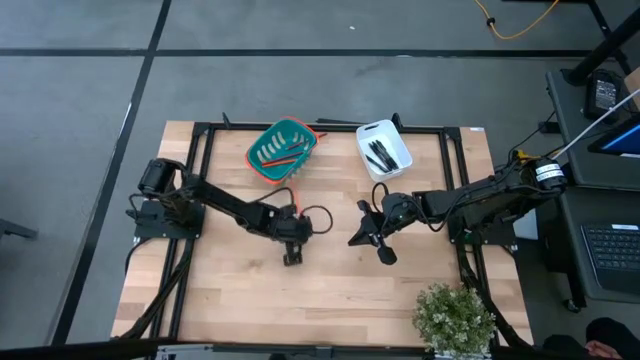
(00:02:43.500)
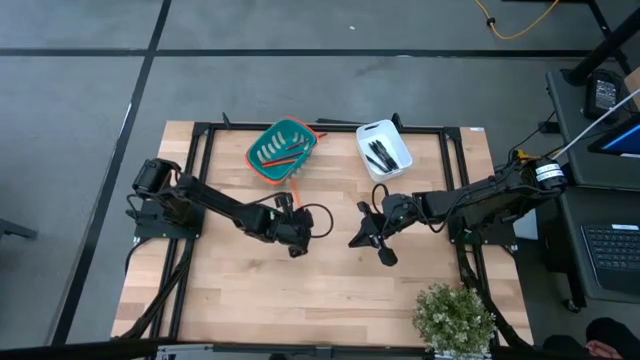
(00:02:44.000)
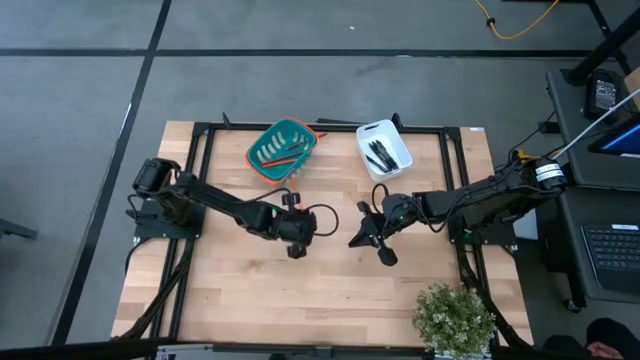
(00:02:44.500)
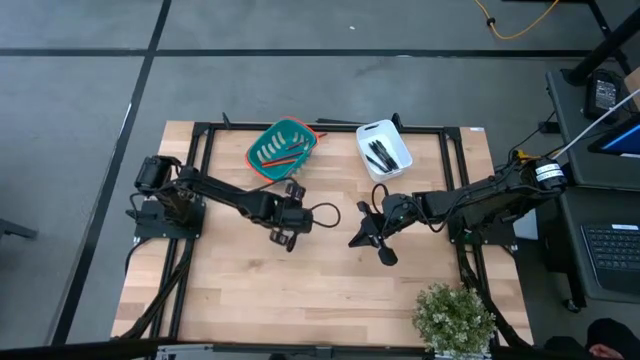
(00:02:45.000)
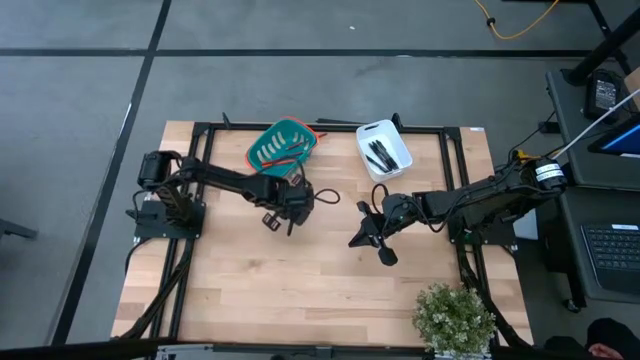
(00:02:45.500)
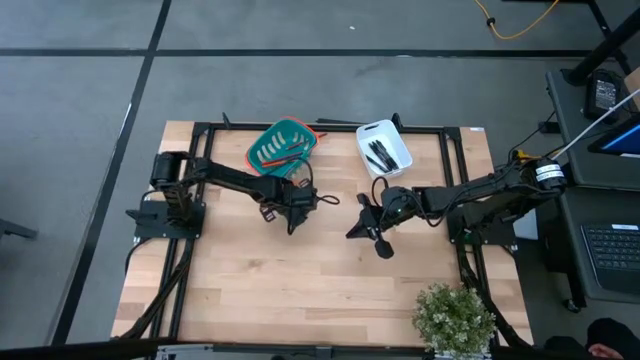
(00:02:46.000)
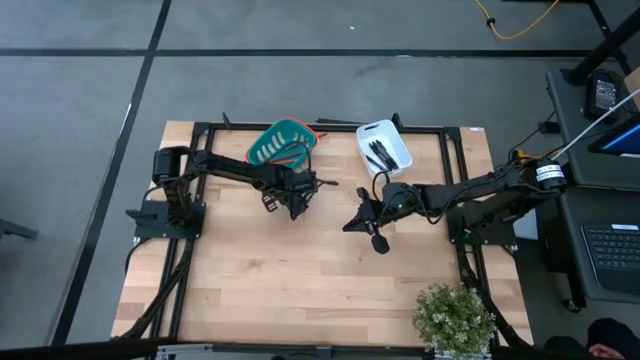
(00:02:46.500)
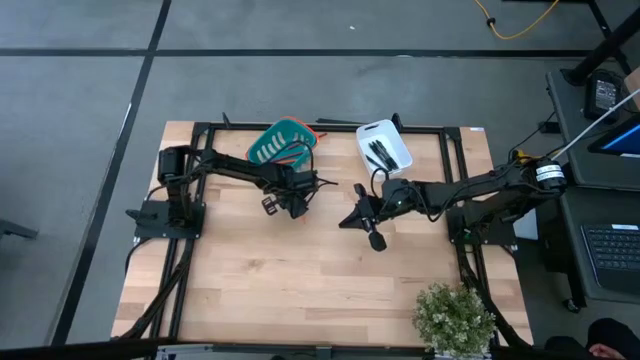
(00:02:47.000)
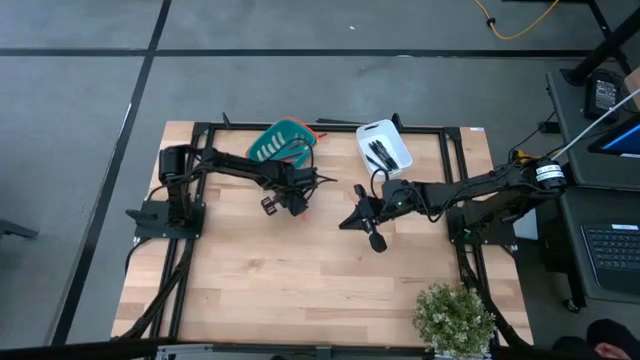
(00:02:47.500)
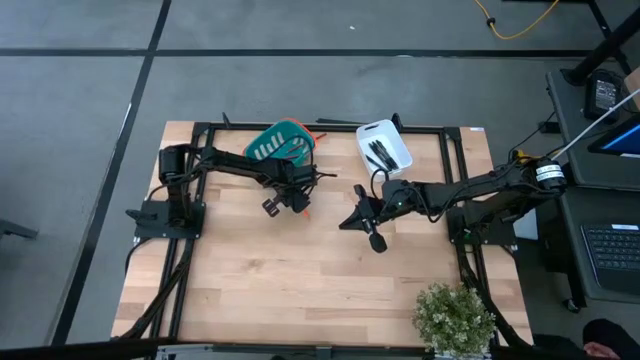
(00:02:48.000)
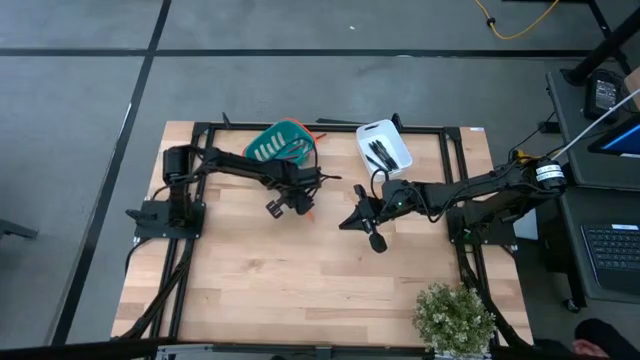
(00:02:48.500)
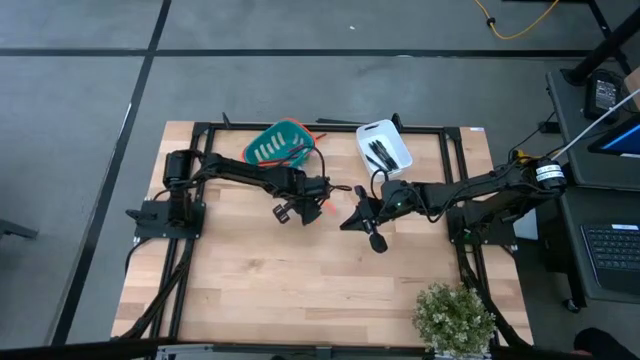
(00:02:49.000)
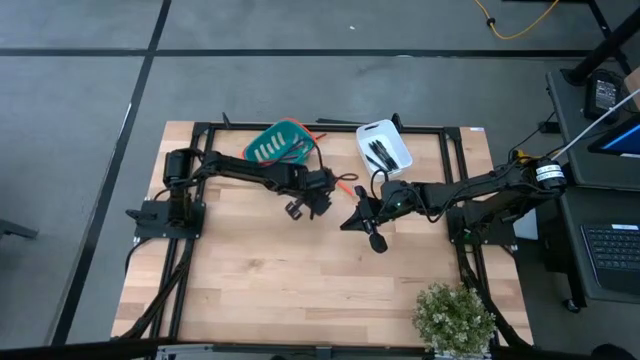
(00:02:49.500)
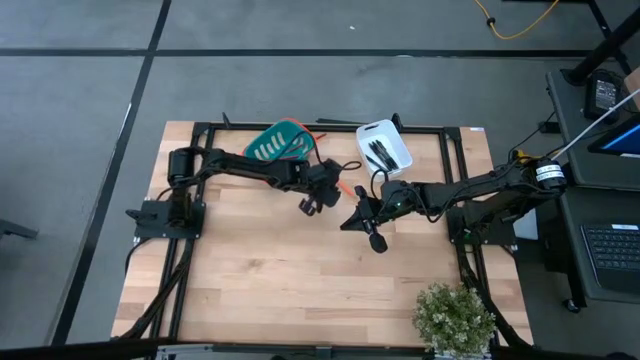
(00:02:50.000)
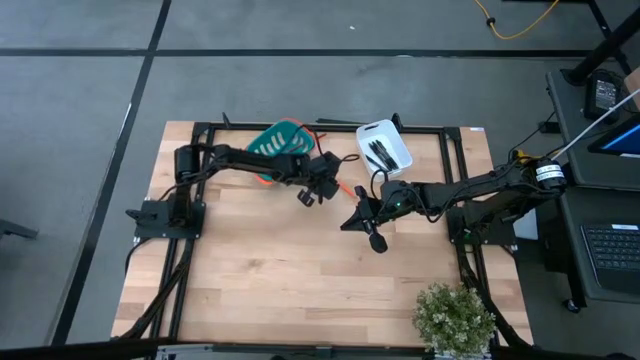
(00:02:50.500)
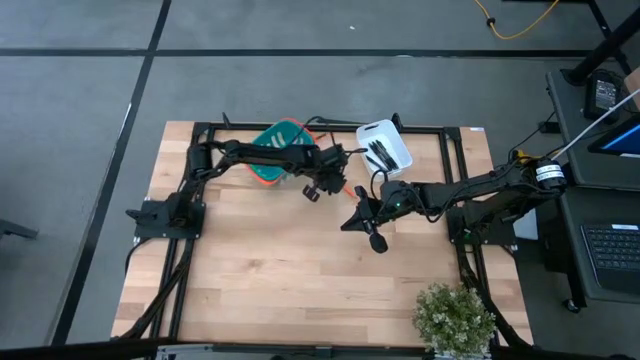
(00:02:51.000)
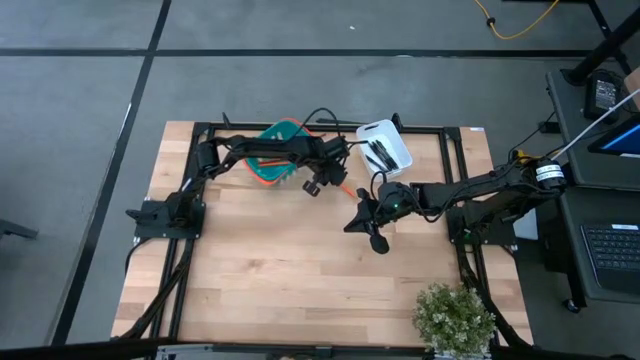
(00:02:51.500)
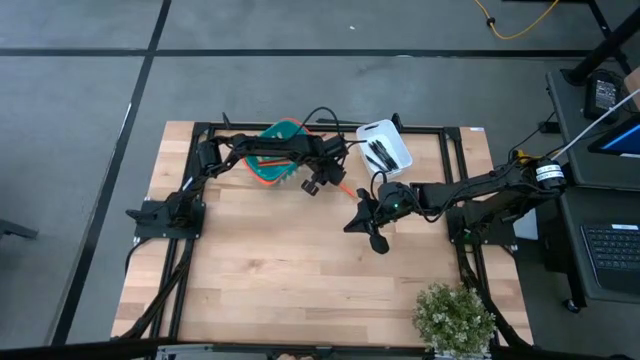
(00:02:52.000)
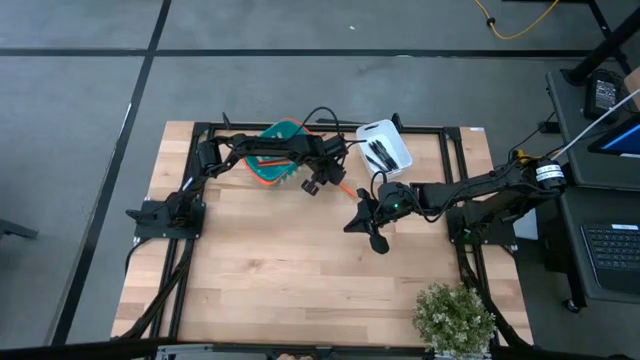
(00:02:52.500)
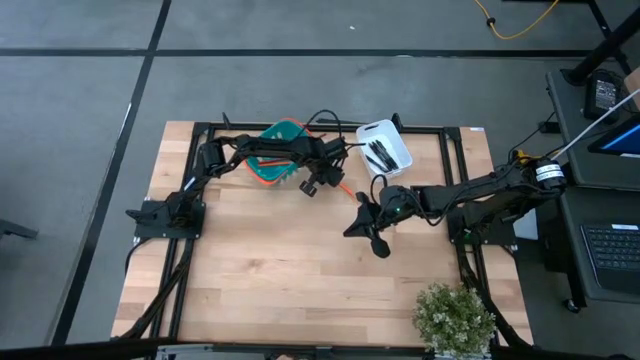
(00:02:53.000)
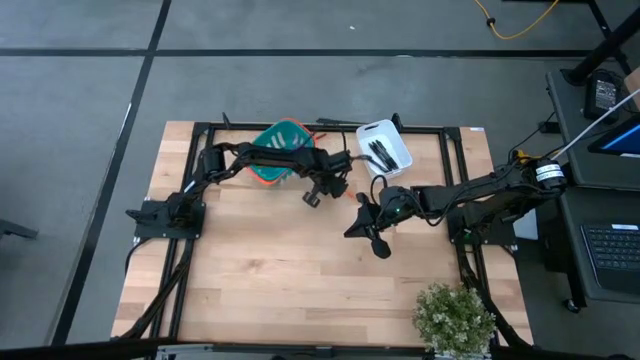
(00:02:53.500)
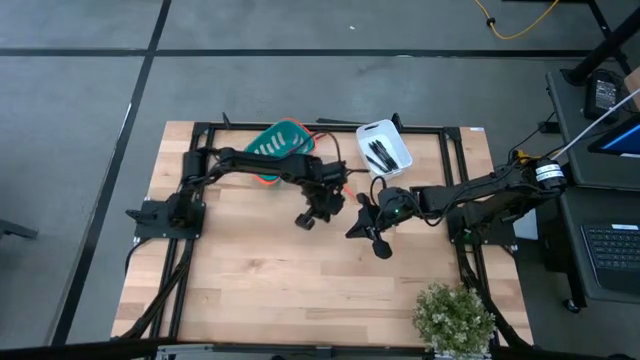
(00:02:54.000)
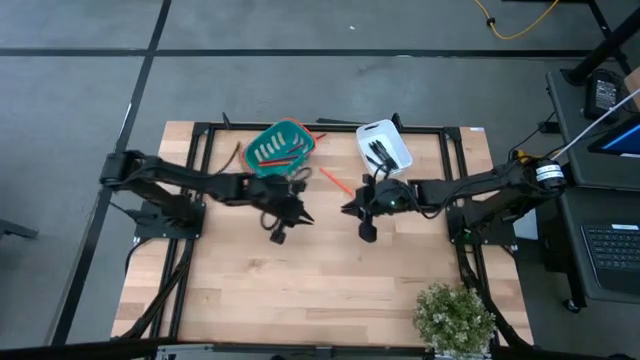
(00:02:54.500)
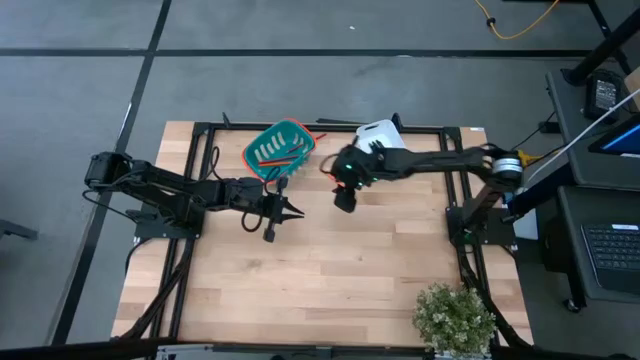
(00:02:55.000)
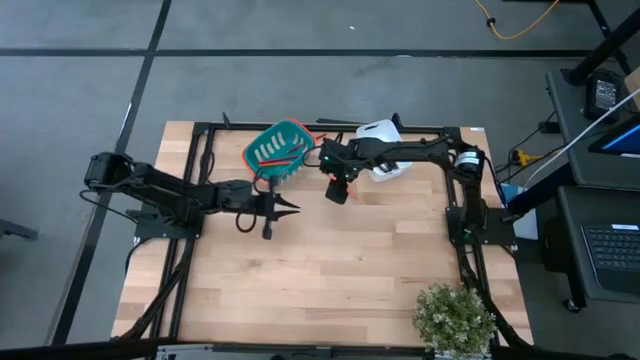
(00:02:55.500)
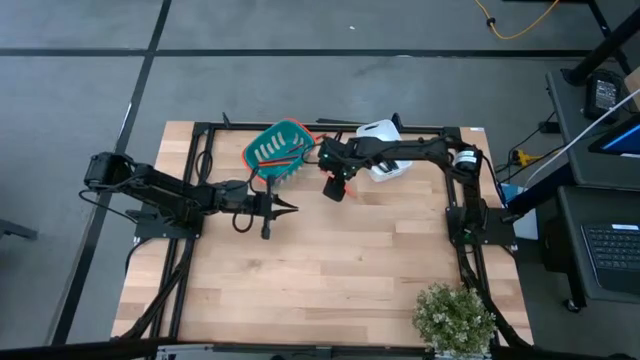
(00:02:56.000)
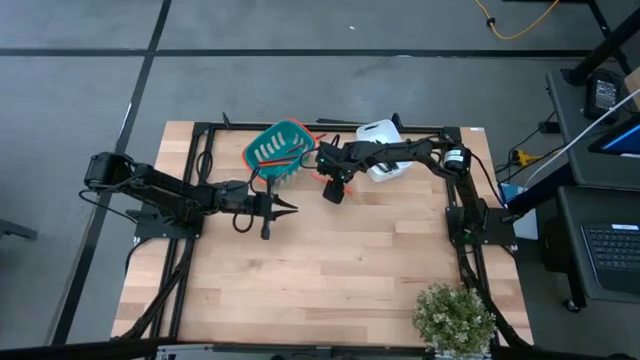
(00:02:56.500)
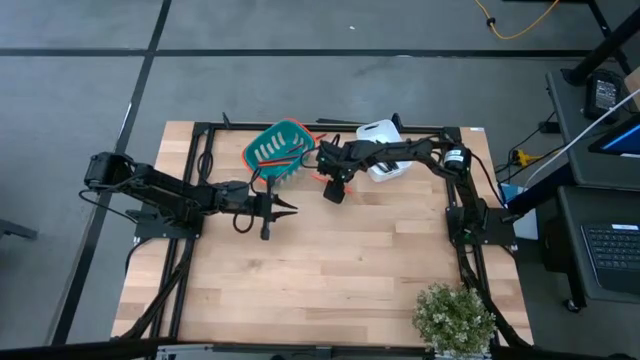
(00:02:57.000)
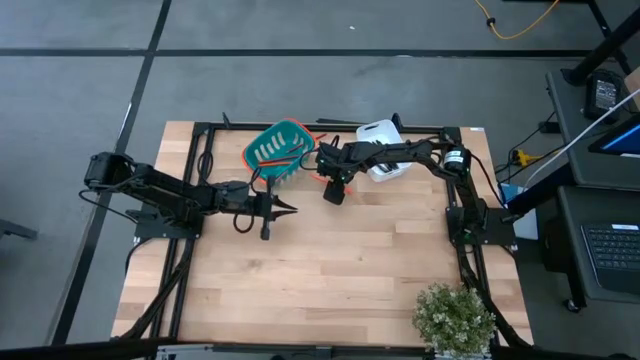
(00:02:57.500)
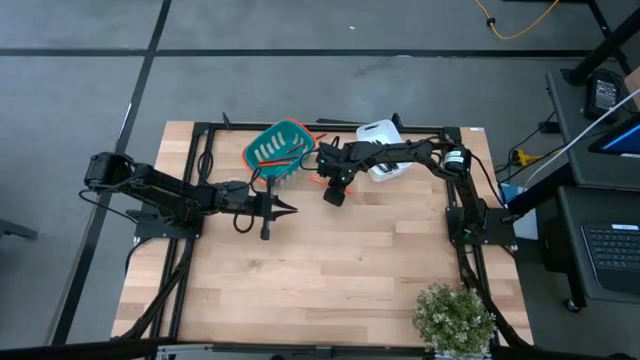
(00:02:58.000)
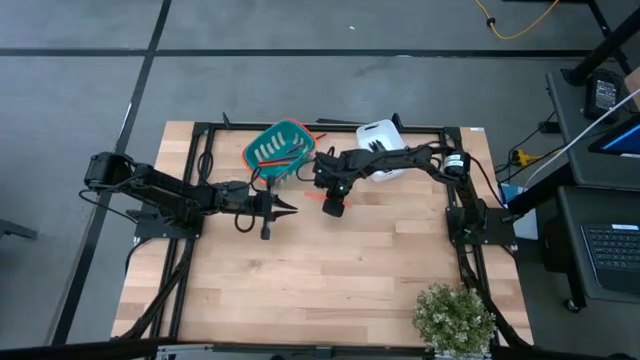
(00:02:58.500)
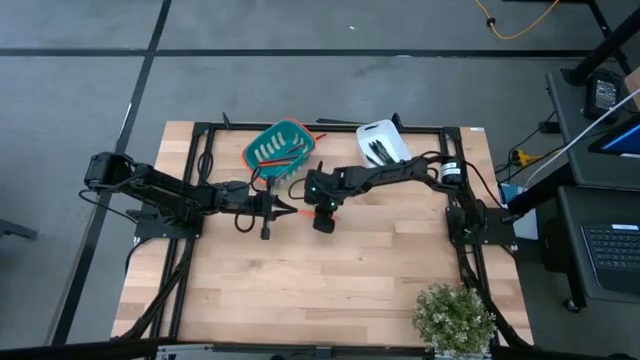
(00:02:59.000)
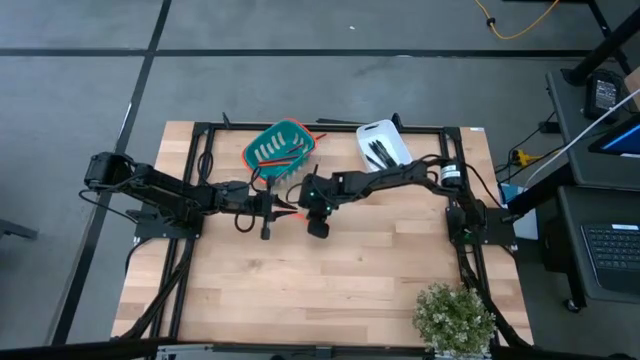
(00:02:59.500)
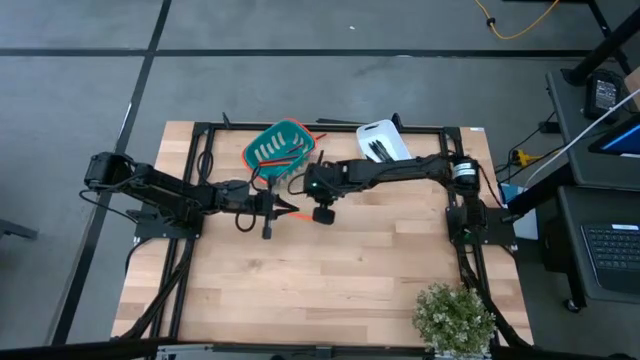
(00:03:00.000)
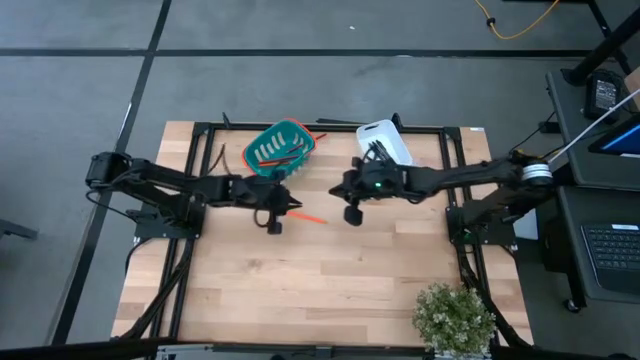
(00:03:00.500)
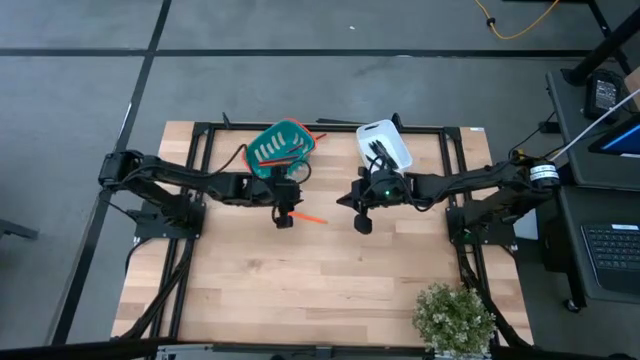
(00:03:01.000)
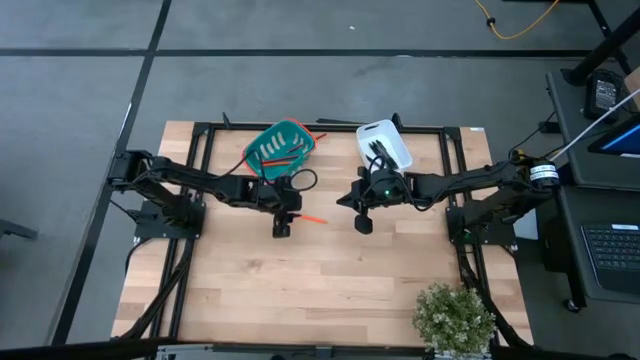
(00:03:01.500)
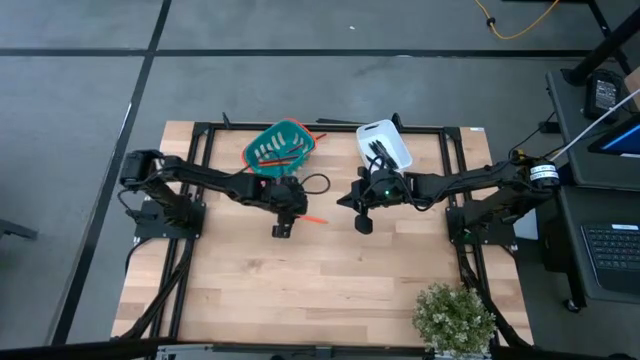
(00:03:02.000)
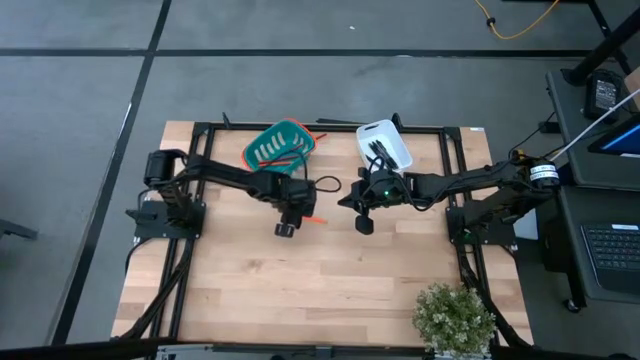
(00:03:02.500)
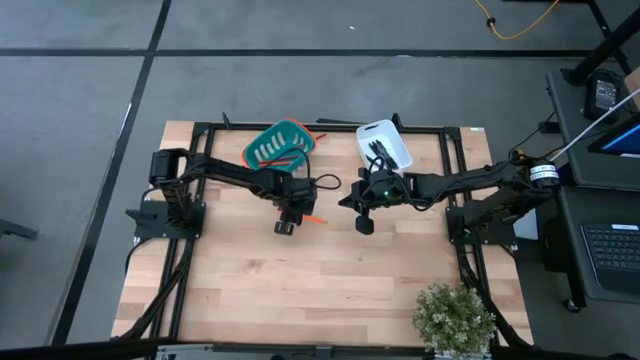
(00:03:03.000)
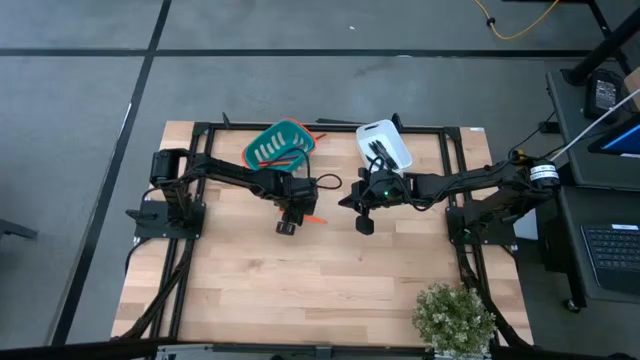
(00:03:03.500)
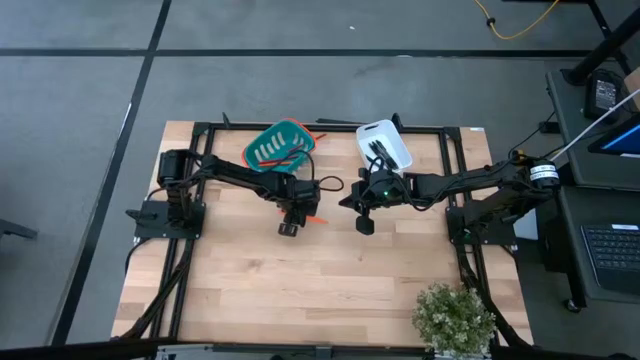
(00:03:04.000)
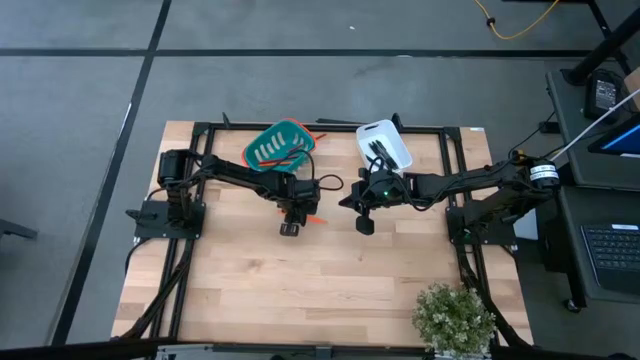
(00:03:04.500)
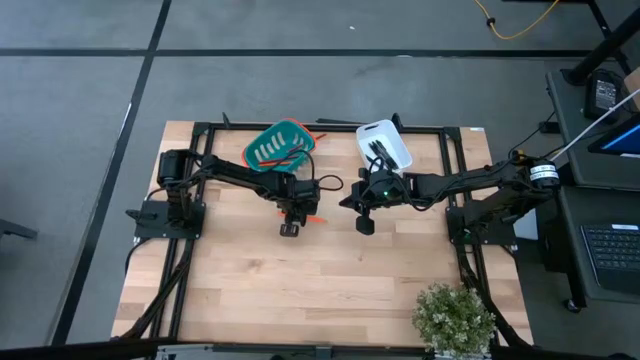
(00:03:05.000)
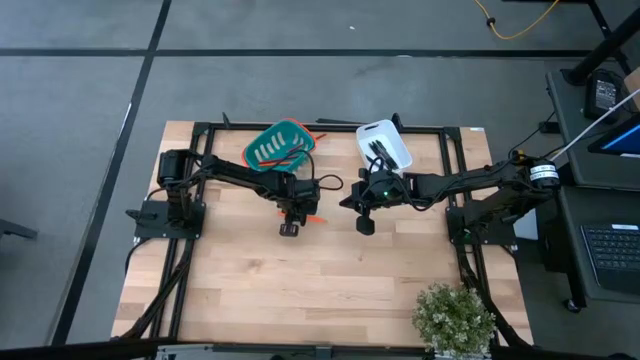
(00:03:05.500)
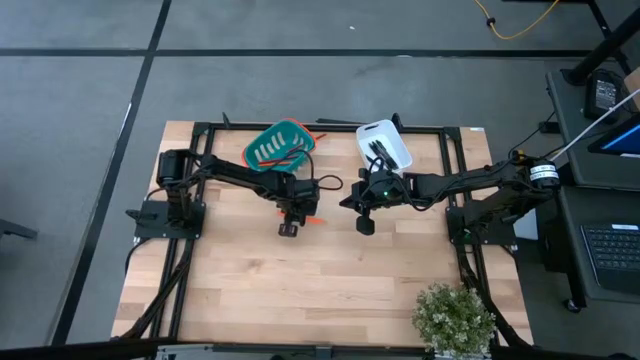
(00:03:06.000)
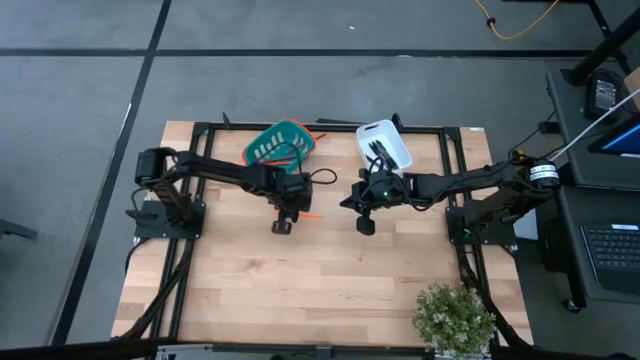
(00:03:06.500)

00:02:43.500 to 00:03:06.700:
Task: Sort pens & pencils
Put the orange pencil into the blue bin
